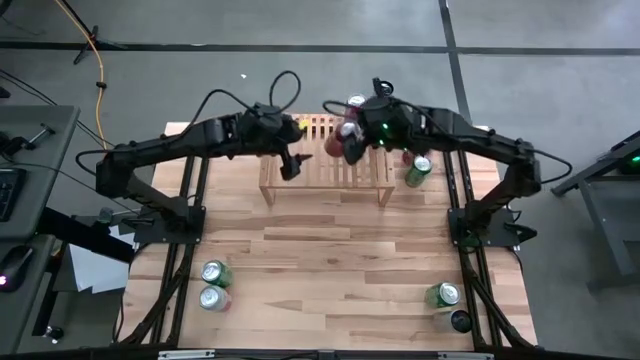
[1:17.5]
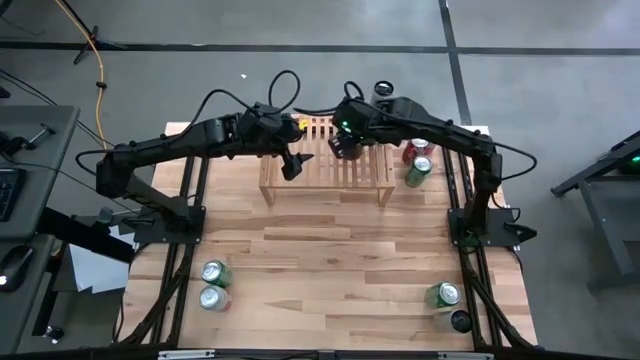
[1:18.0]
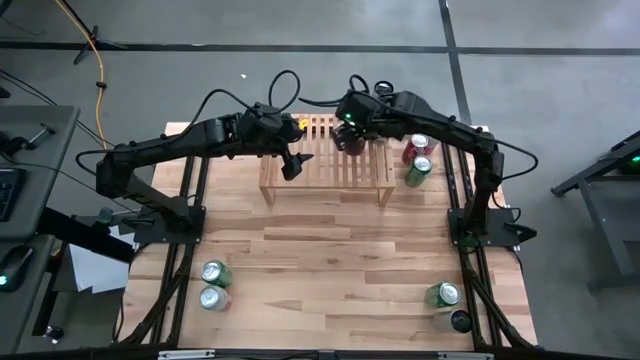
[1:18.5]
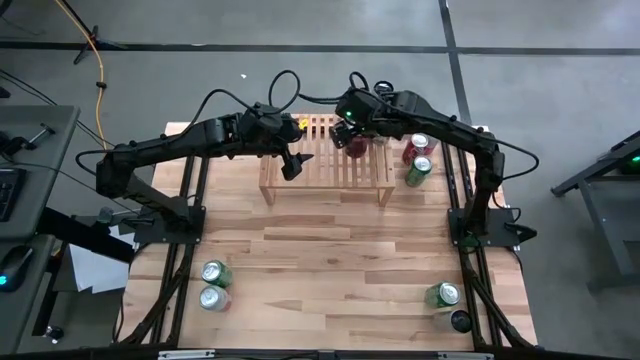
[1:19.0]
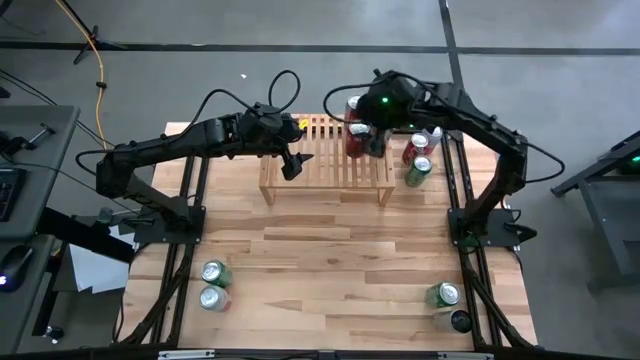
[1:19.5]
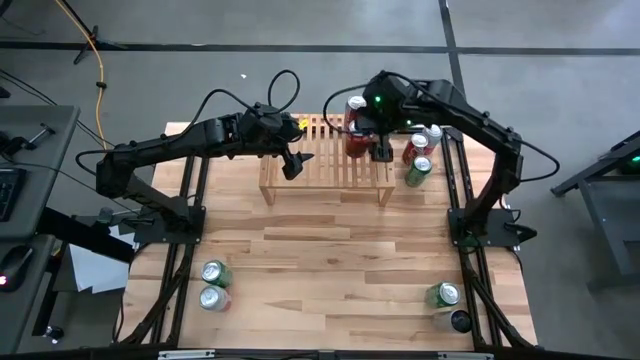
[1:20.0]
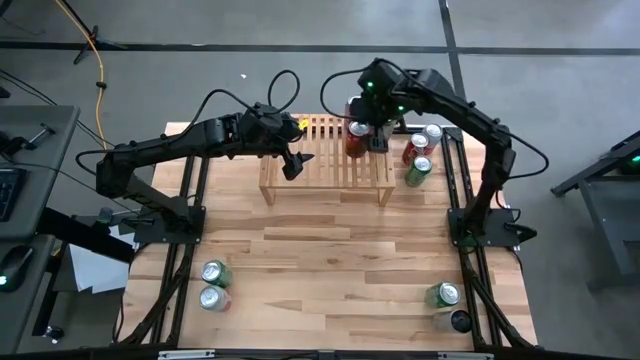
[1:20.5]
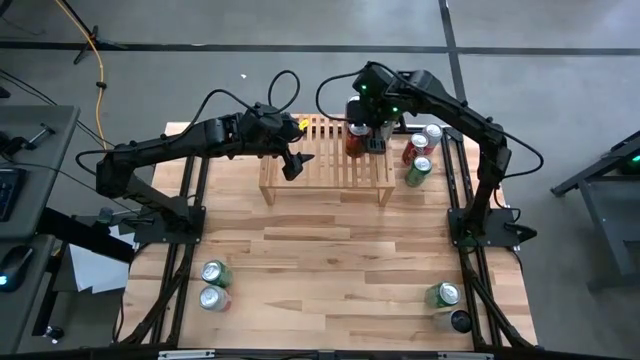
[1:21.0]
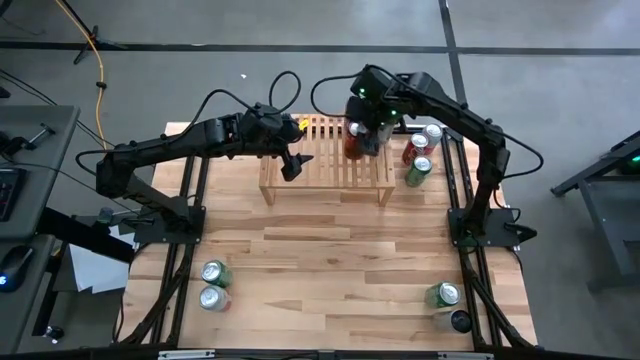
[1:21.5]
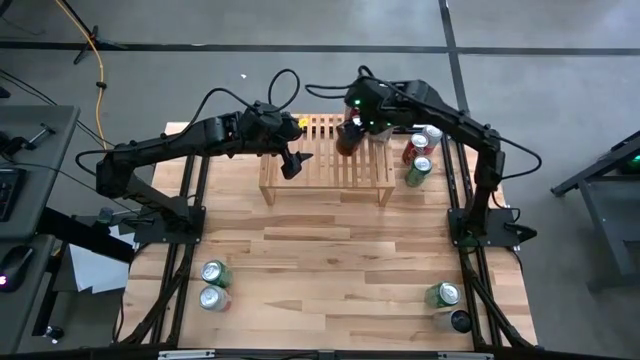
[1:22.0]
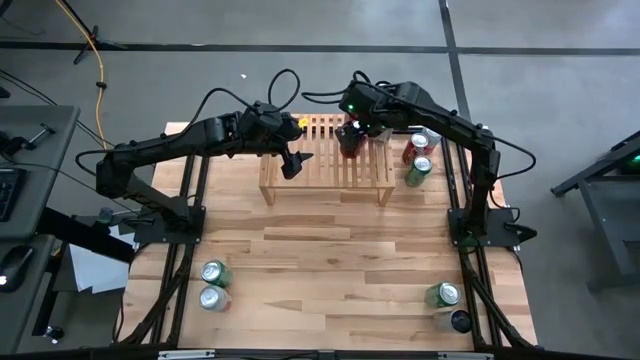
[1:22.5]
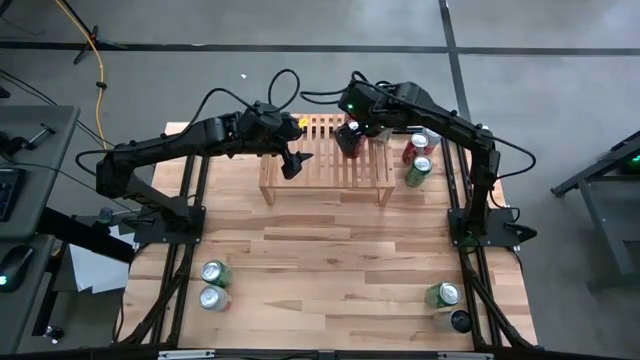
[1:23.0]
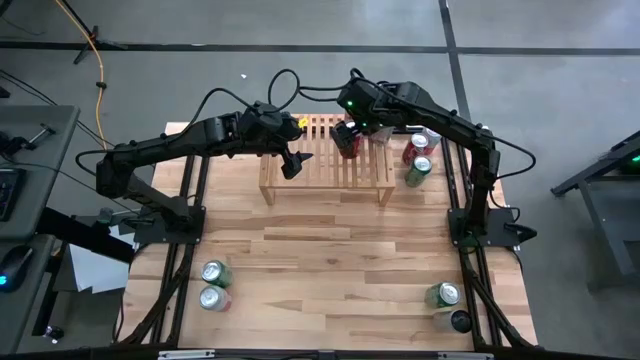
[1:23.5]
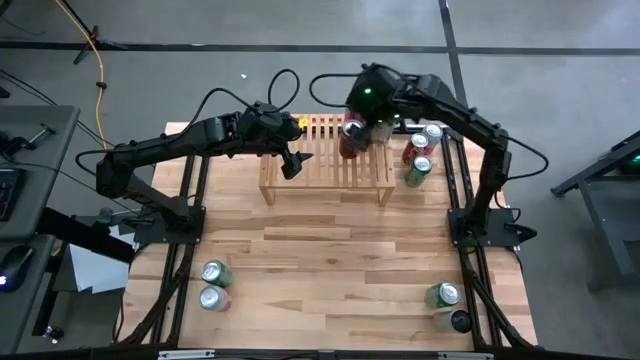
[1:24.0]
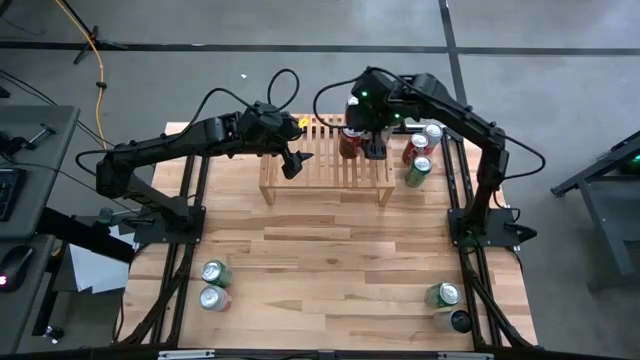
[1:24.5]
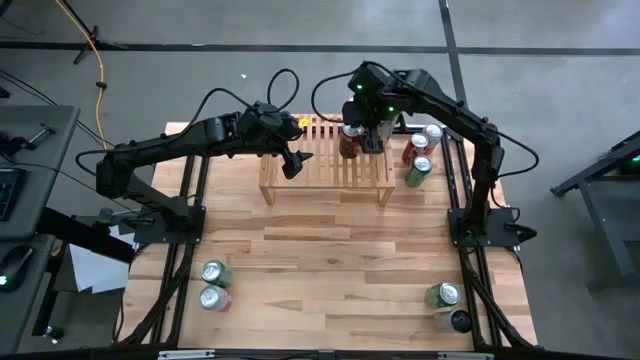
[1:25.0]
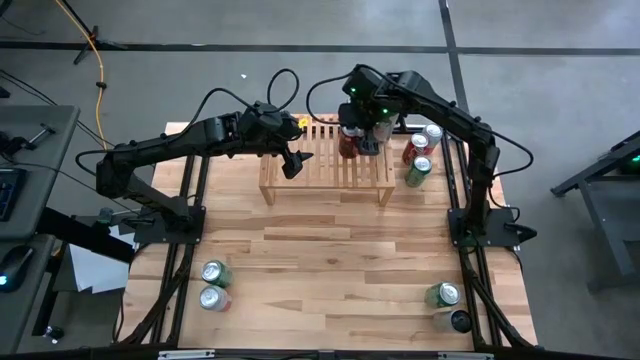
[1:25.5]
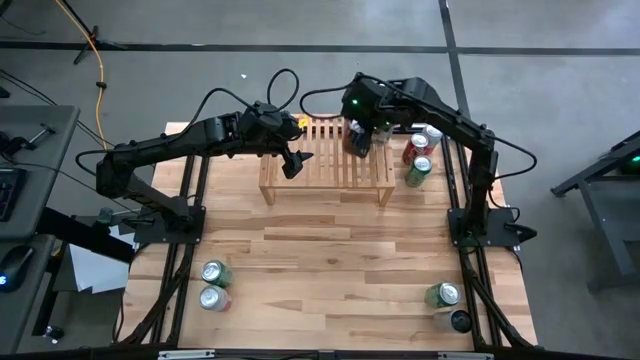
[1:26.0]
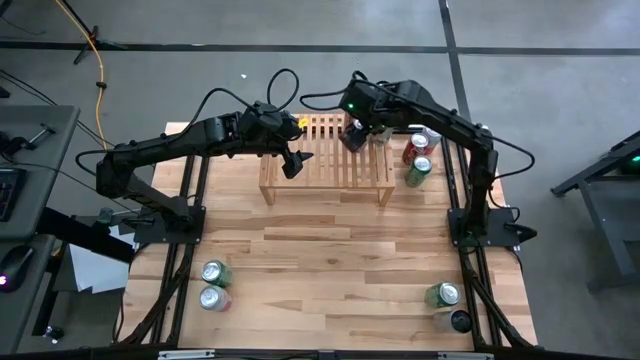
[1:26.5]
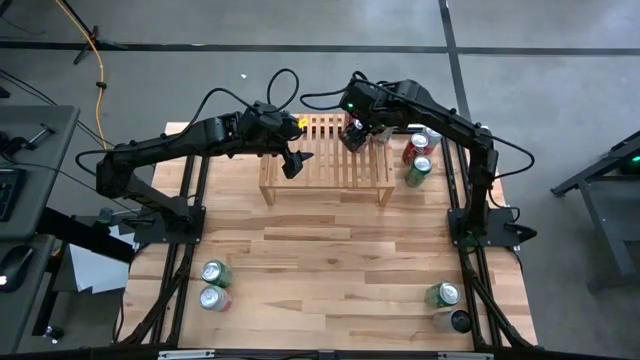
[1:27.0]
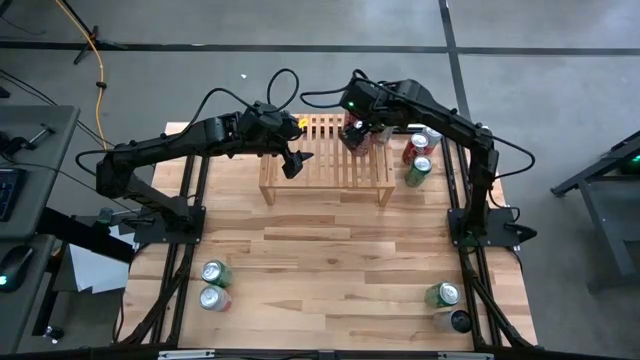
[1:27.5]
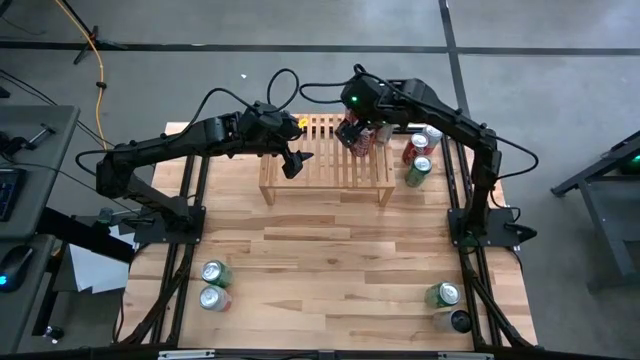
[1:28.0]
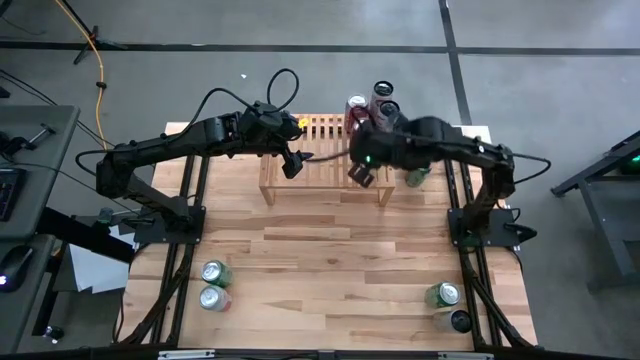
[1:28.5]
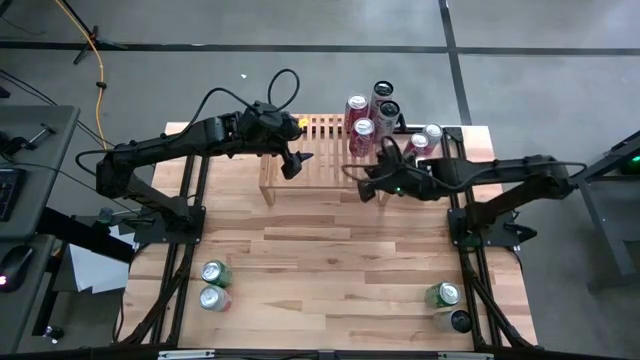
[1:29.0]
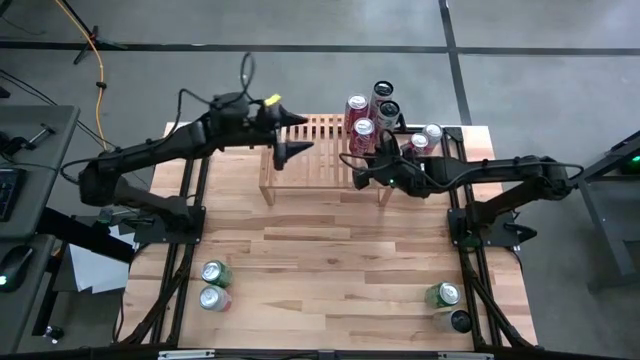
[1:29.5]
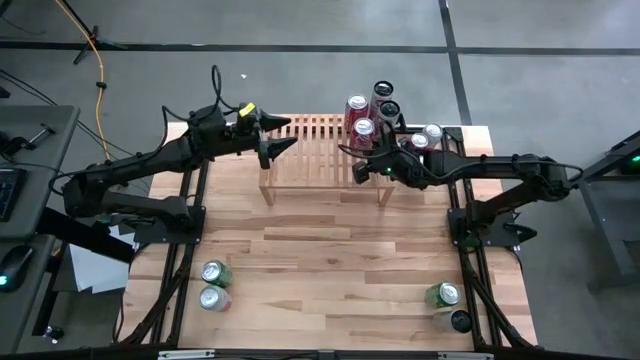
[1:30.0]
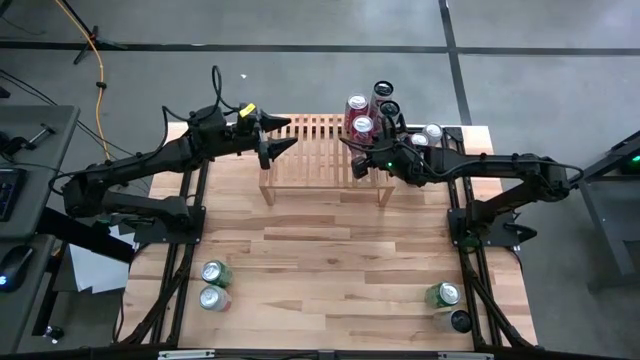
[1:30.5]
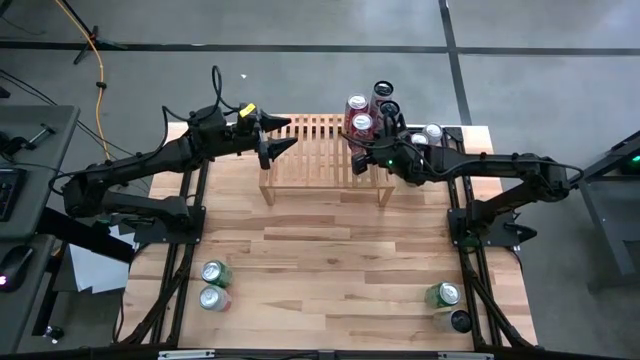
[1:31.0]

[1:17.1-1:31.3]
Task: Place canned beverage on shelf
Put the left red white soda can on the shelf aligned with the other red white soda can

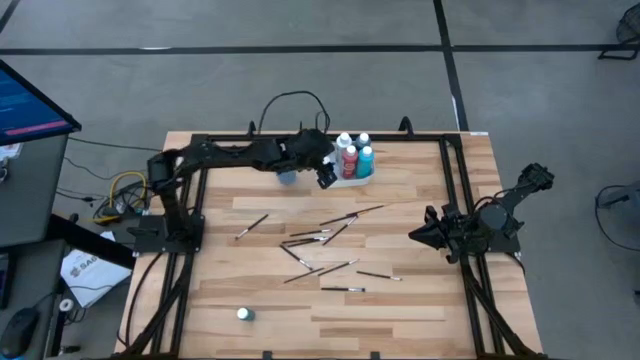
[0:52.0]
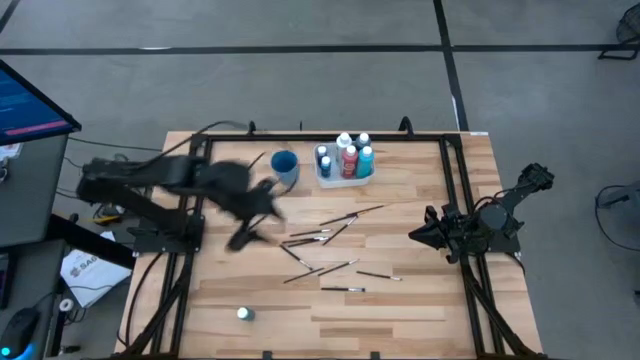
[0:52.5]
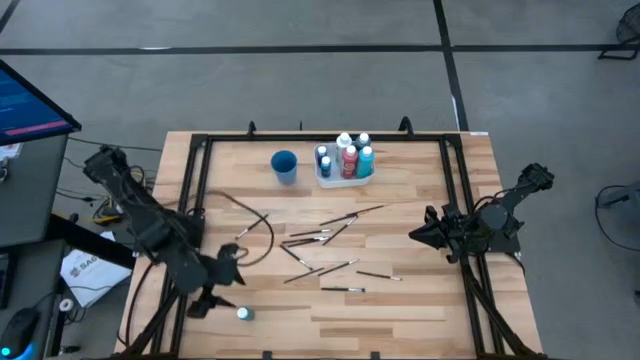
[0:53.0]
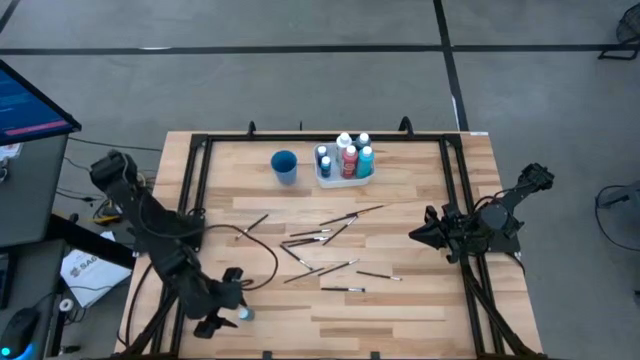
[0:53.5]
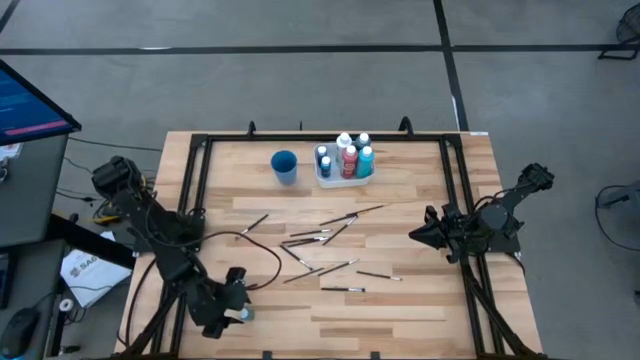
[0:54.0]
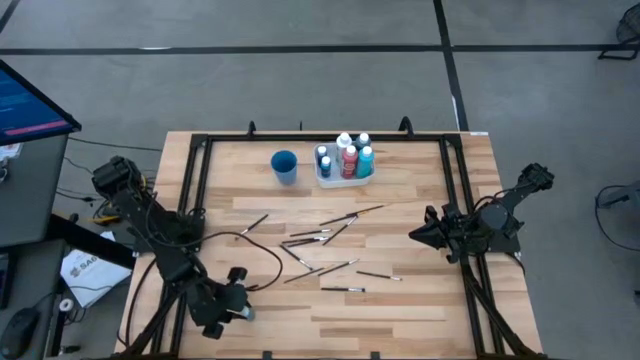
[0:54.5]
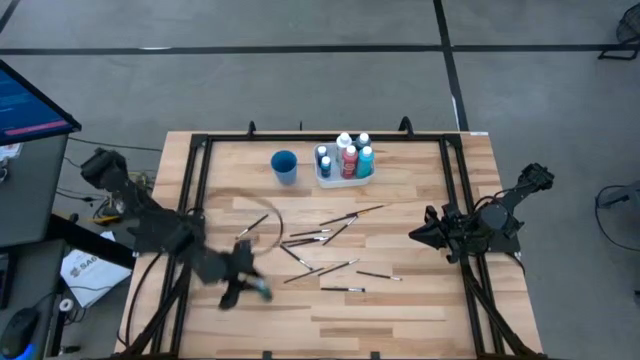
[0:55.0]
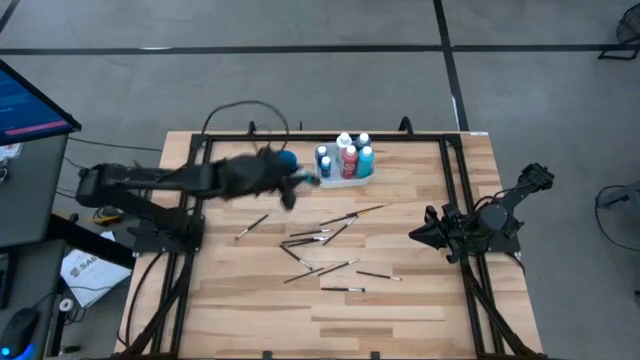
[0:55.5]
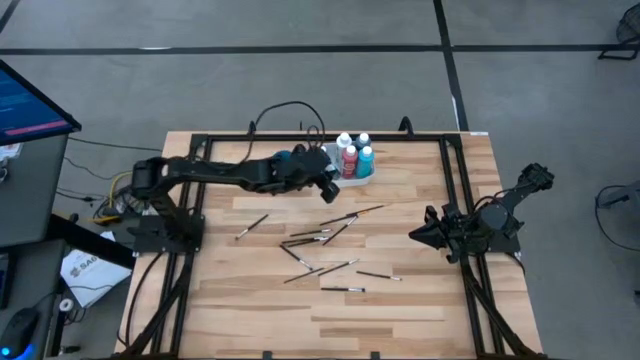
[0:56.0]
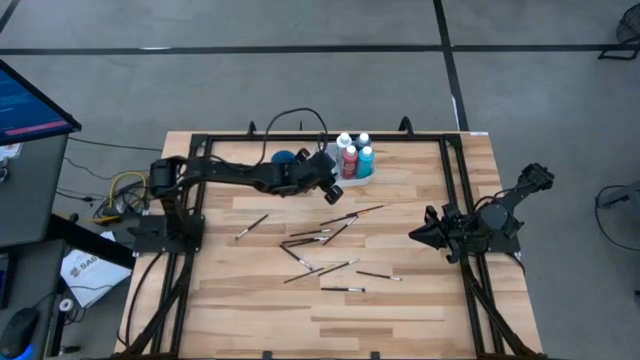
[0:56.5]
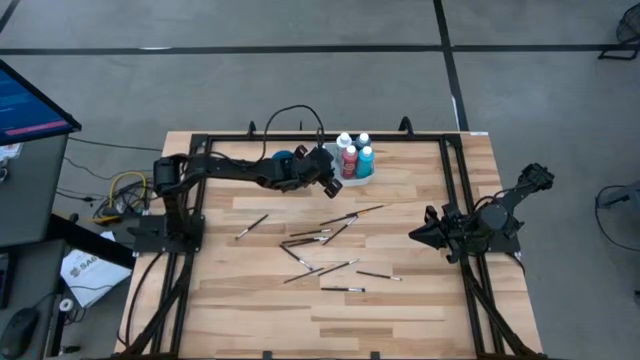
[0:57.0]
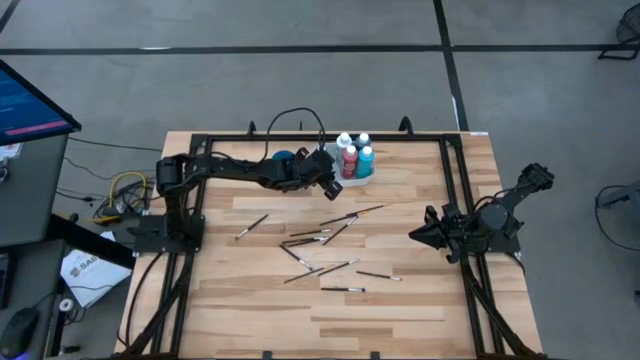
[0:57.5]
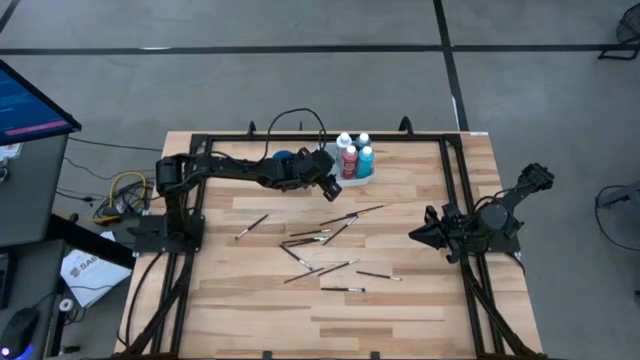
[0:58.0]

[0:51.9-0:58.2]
Task: Pick & Place Paint Supplies
Put the green paint bottle into the white bin
